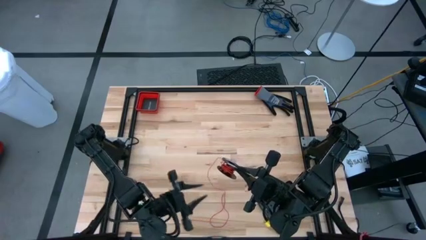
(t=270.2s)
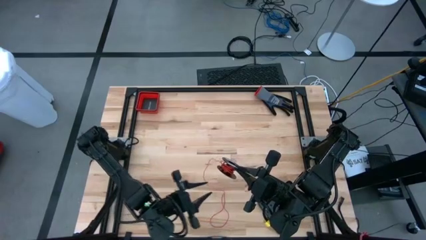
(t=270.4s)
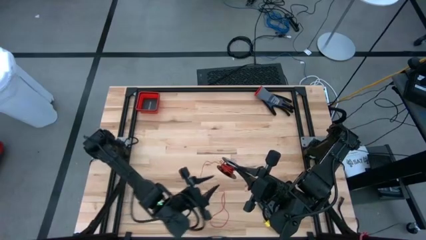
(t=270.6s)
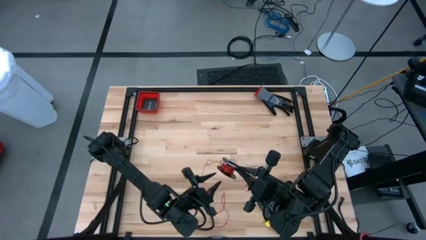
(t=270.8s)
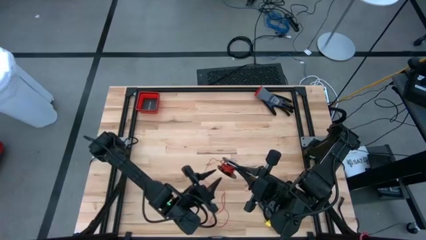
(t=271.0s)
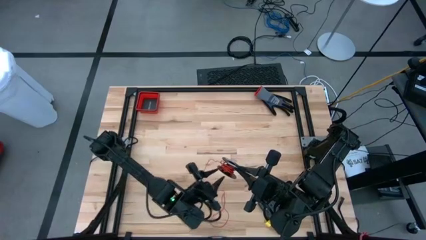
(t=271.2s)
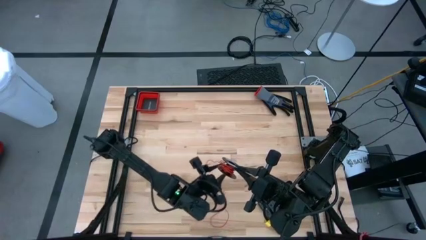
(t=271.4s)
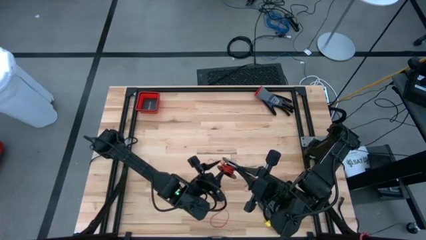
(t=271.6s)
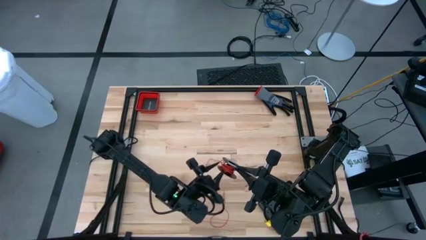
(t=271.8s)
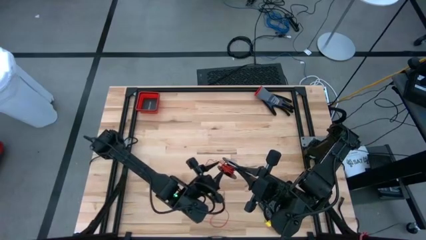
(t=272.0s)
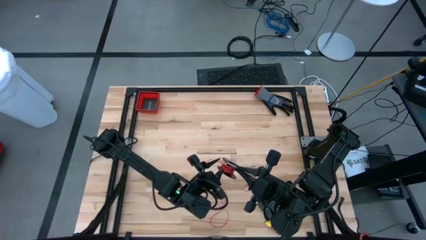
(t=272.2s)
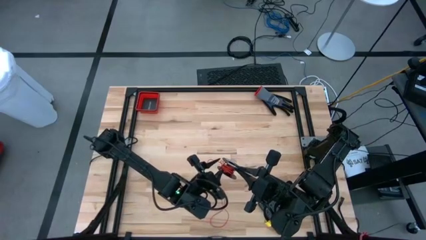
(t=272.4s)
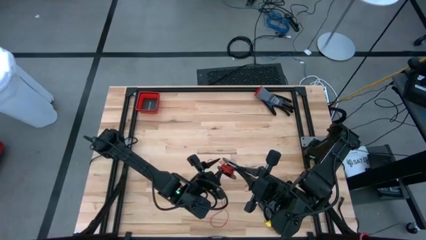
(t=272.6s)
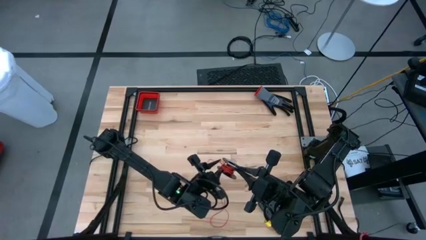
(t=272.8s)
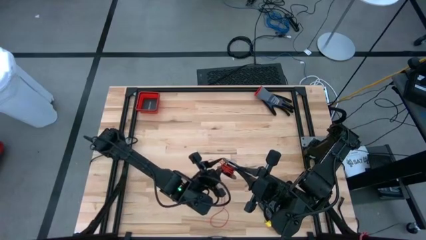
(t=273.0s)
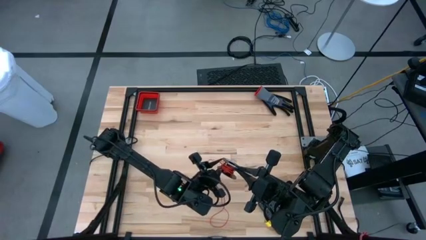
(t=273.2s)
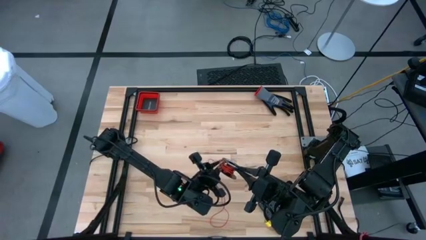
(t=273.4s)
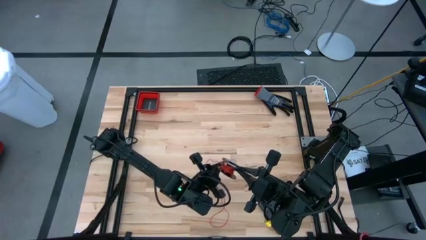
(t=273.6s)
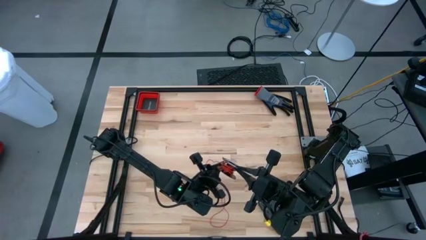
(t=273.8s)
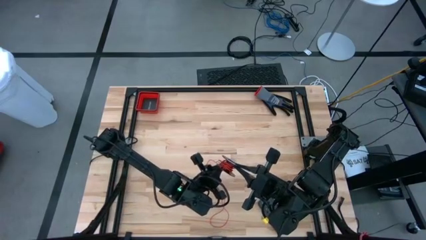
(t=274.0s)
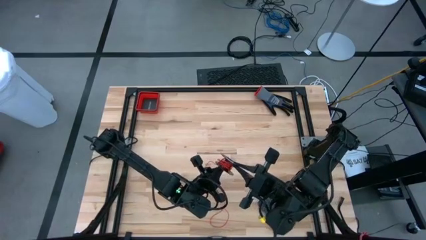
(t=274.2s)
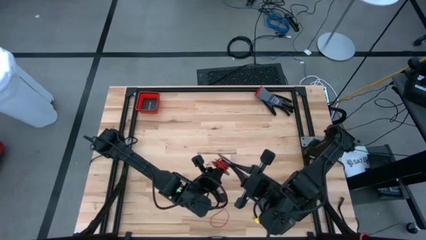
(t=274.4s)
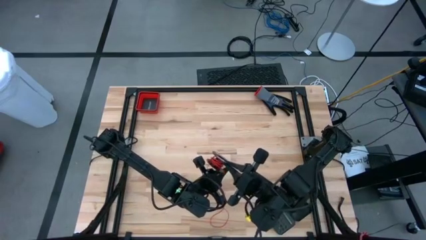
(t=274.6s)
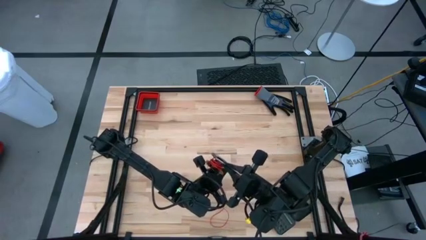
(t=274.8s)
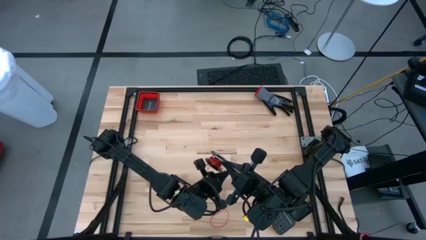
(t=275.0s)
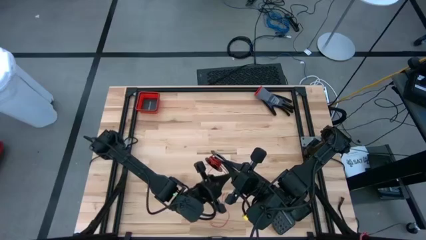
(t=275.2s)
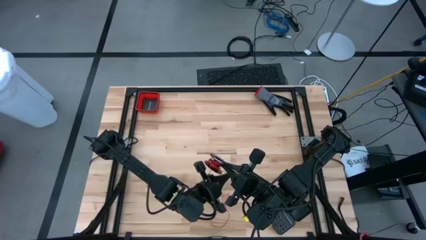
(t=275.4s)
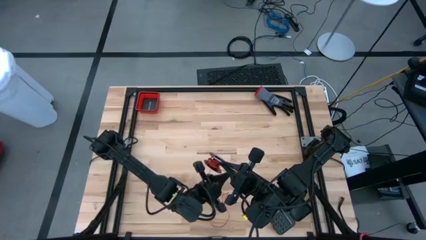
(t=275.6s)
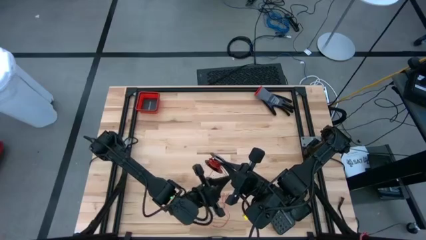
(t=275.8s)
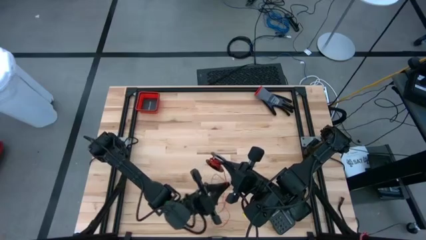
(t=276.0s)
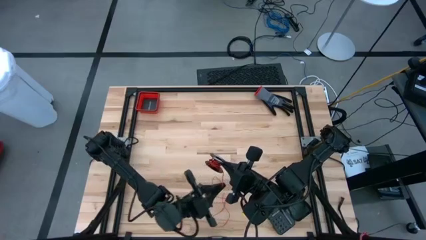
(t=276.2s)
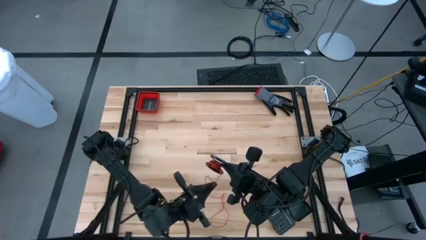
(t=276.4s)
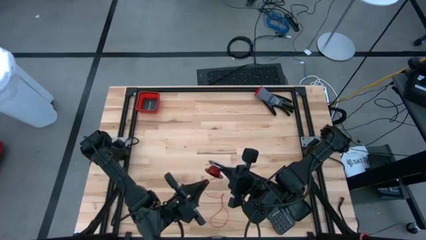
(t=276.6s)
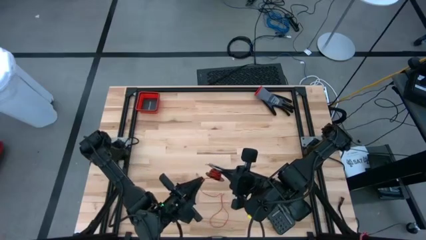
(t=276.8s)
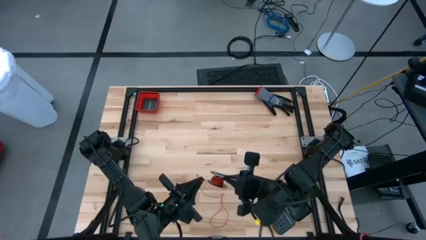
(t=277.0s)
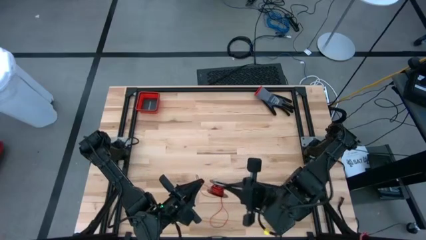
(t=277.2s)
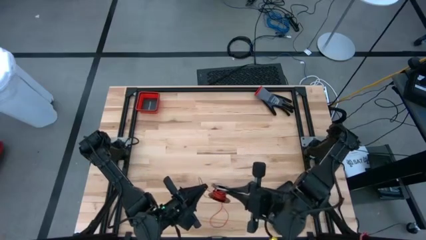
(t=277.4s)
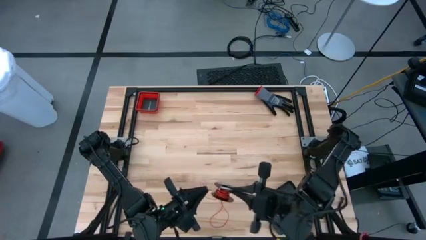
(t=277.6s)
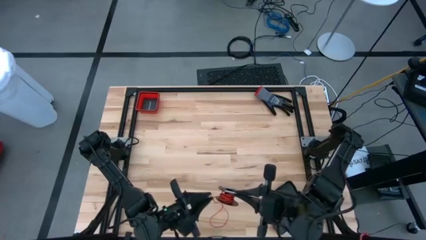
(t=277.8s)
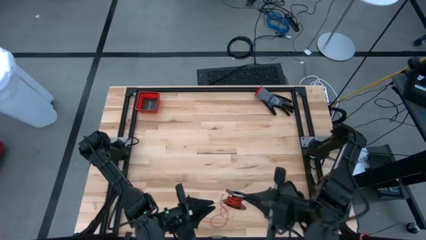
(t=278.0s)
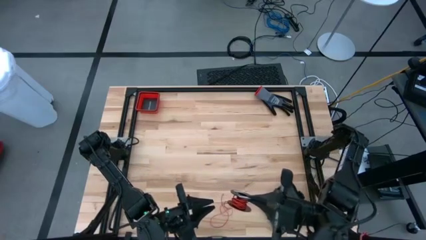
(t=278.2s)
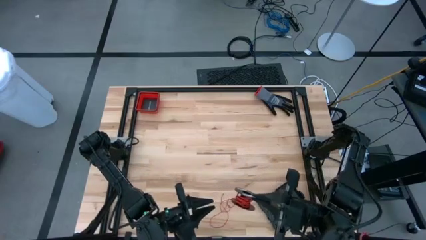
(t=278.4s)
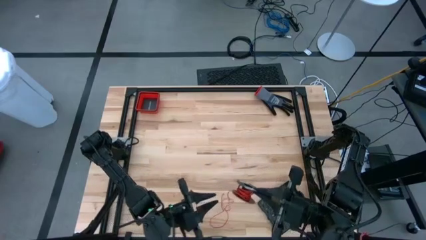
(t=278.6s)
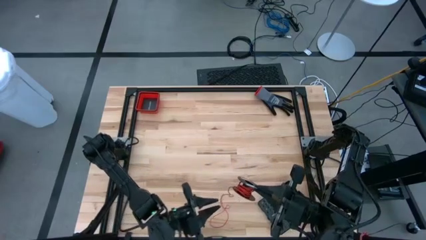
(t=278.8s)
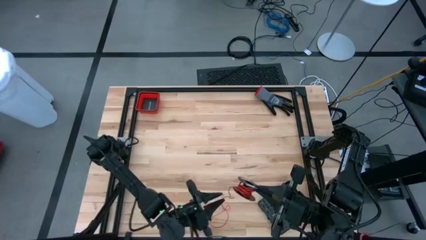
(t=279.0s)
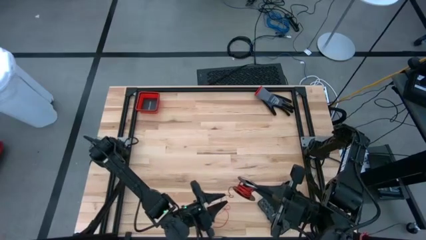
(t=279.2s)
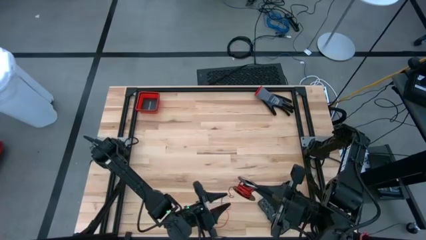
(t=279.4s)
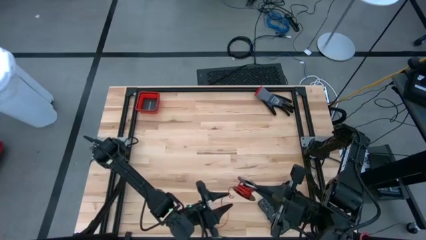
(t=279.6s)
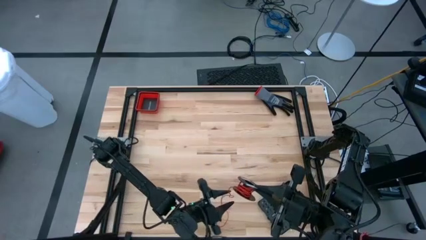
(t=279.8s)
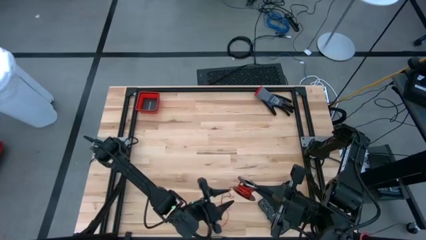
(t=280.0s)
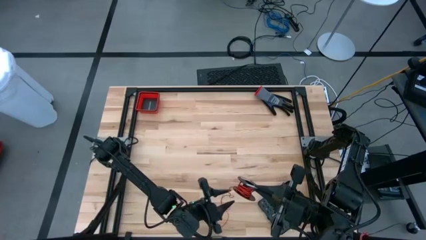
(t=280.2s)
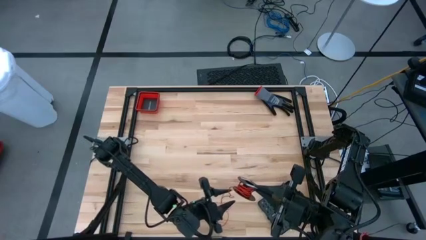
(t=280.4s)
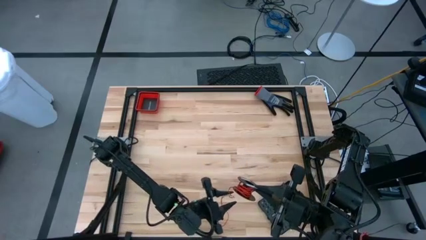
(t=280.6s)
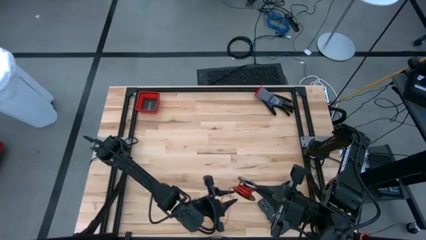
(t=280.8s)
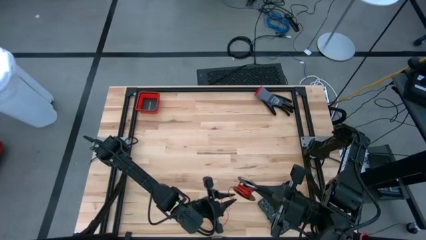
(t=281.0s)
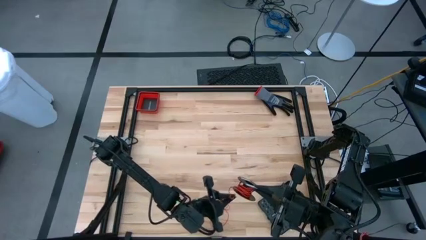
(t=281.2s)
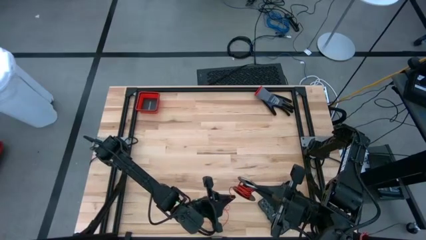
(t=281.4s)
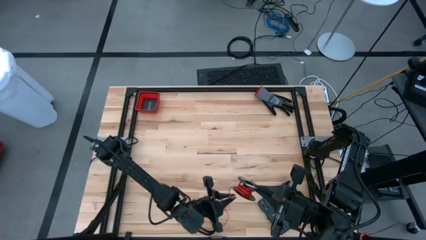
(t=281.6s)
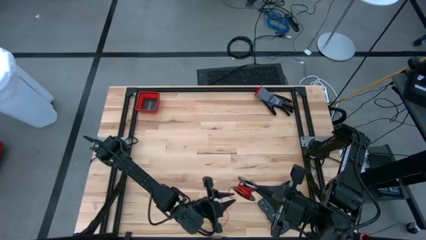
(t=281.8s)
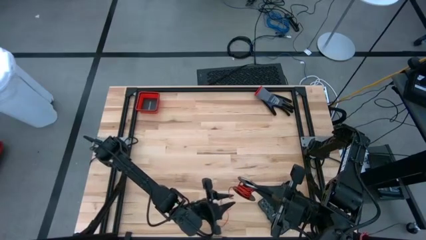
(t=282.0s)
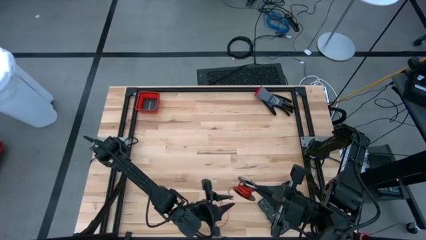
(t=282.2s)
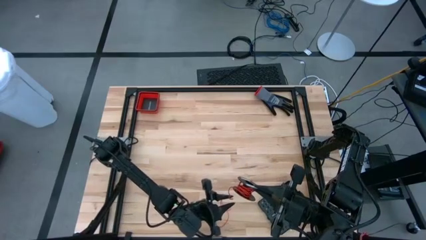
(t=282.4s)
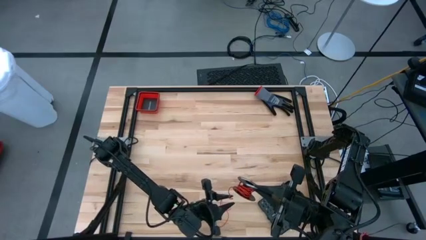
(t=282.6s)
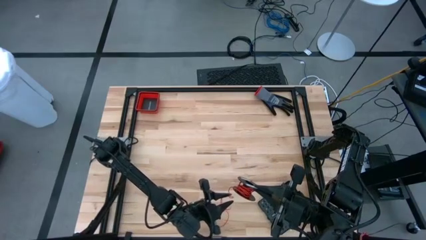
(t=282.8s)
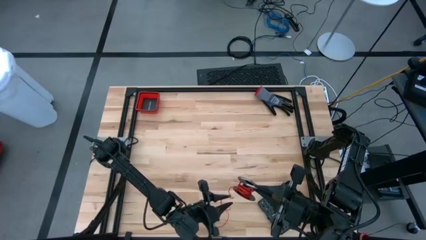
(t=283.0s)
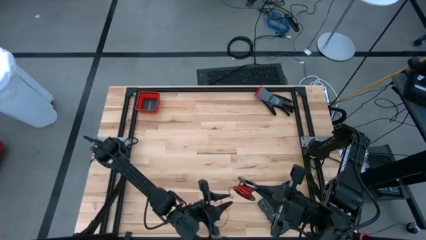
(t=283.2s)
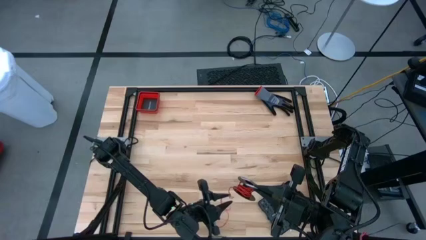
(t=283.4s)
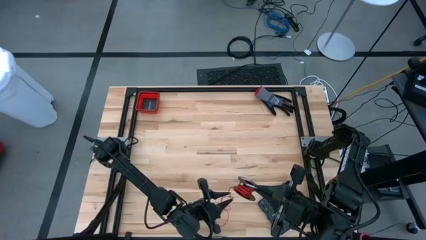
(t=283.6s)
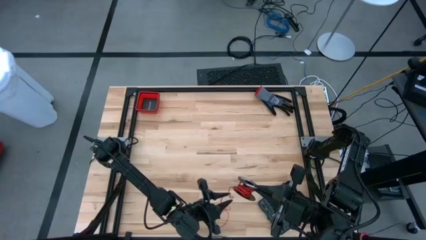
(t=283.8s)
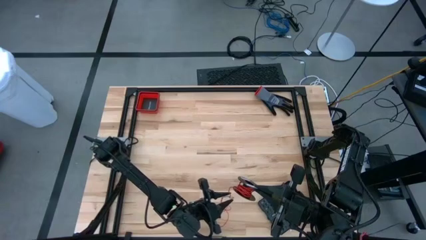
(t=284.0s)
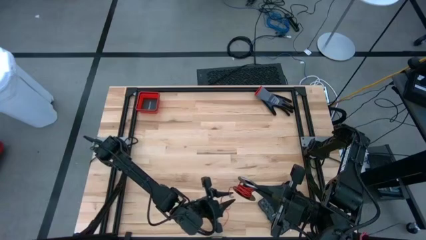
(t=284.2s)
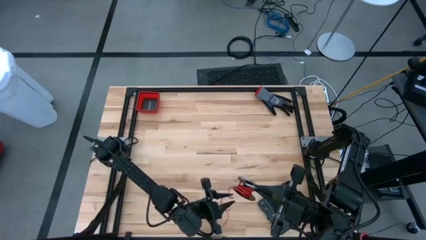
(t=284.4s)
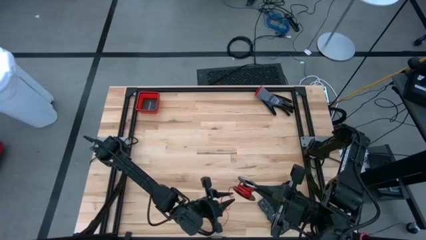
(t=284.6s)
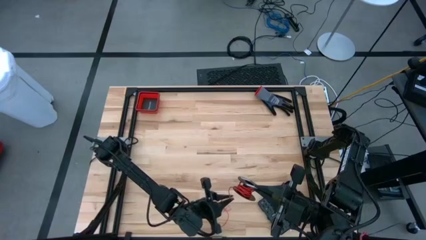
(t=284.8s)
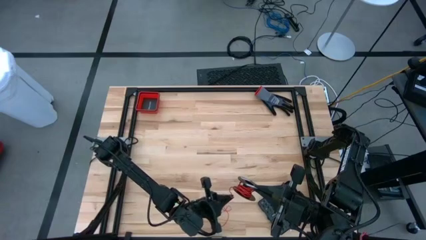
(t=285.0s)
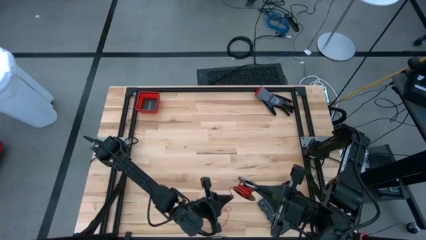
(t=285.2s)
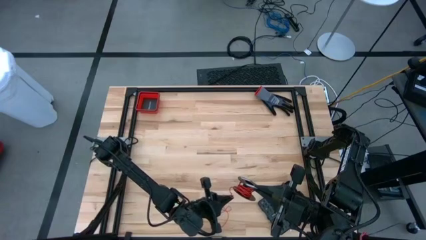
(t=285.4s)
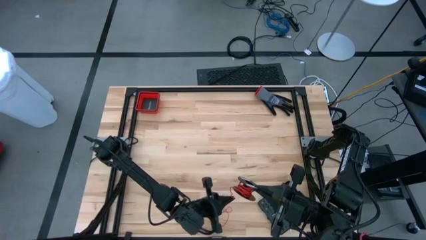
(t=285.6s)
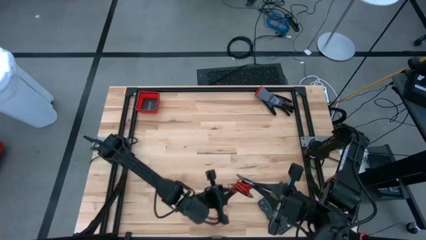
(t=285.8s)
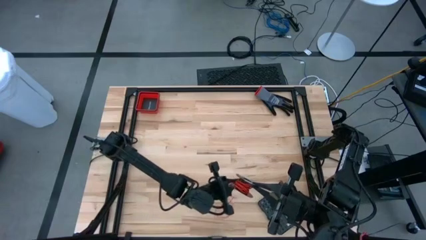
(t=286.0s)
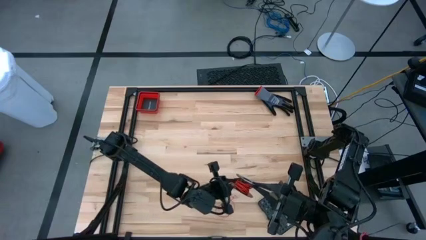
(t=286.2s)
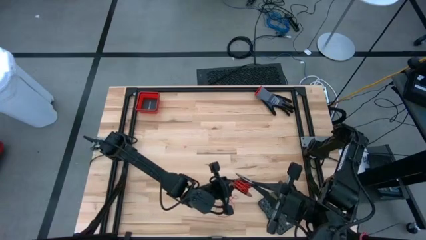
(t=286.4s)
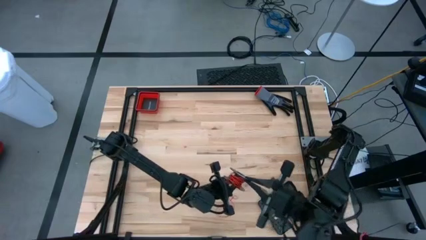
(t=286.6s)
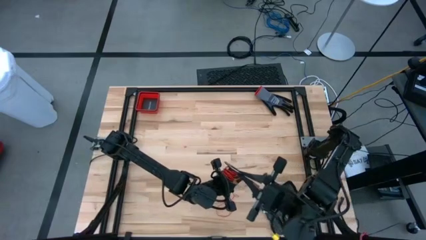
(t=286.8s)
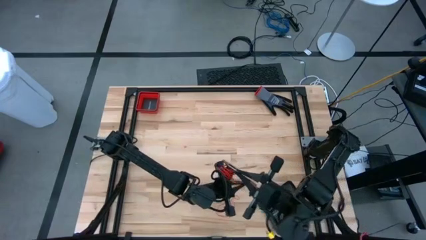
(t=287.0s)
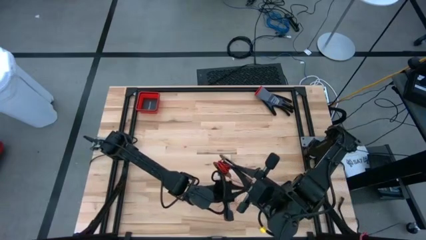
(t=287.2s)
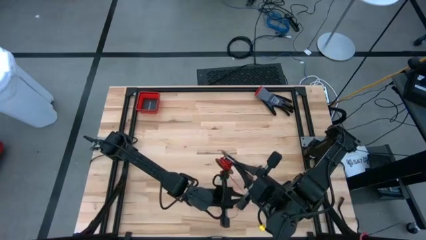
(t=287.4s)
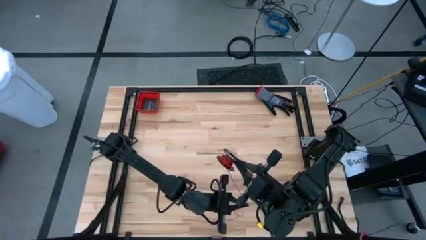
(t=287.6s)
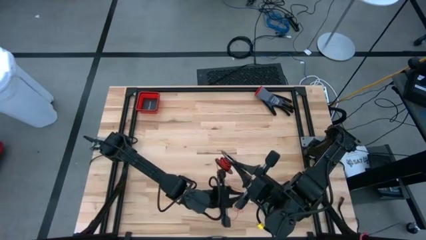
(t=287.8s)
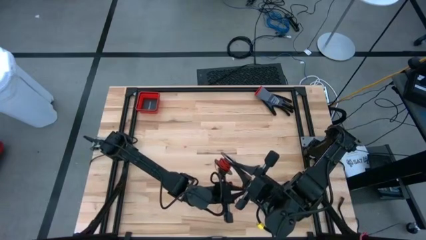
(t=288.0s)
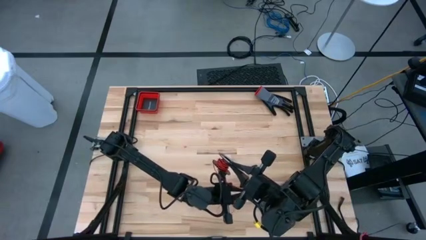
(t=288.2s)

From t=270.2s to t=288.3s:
Task: Coil cords
Coil the red wire onto the spool
